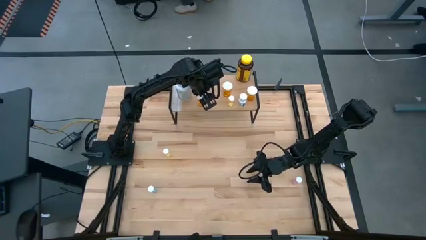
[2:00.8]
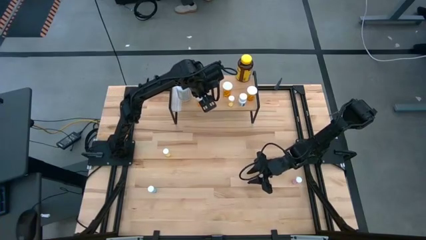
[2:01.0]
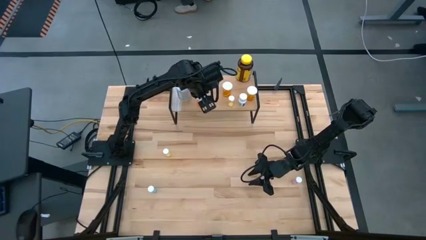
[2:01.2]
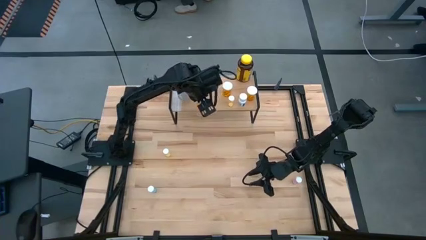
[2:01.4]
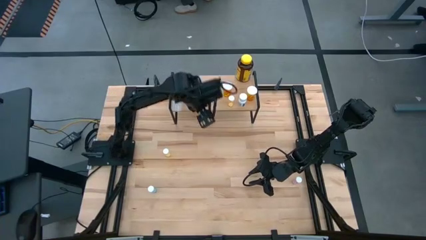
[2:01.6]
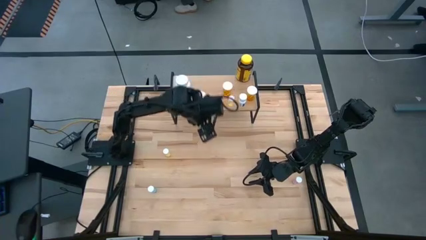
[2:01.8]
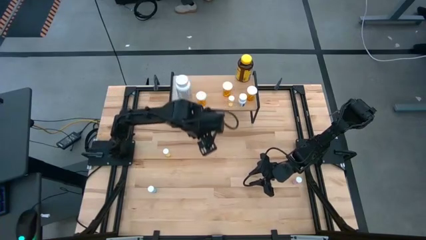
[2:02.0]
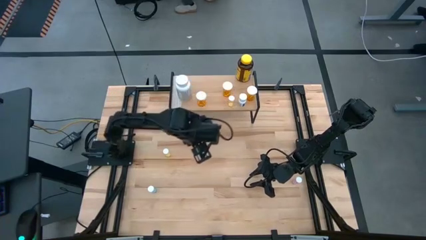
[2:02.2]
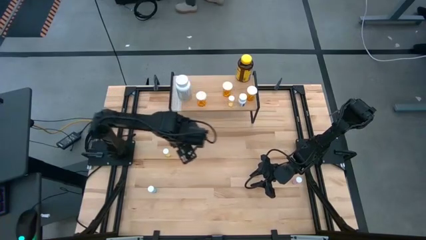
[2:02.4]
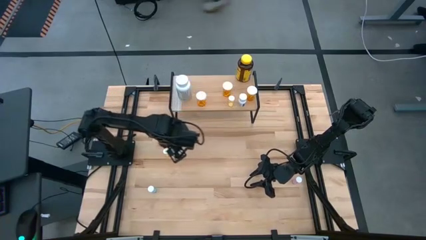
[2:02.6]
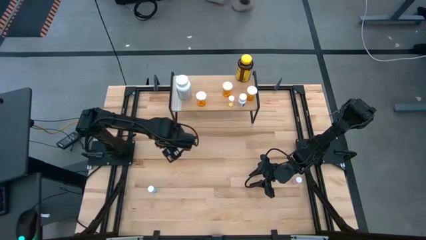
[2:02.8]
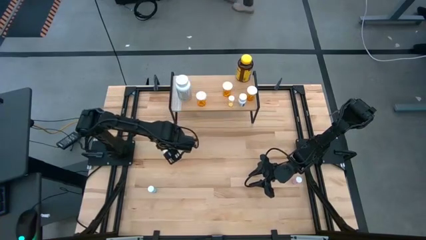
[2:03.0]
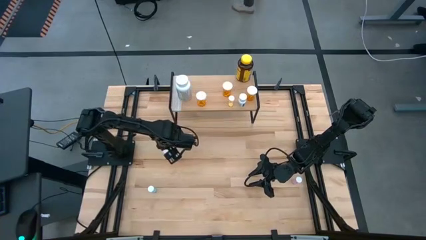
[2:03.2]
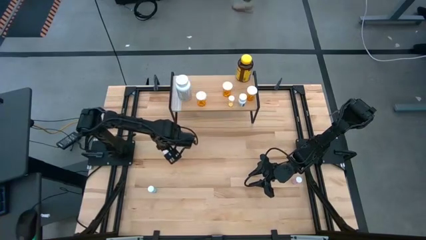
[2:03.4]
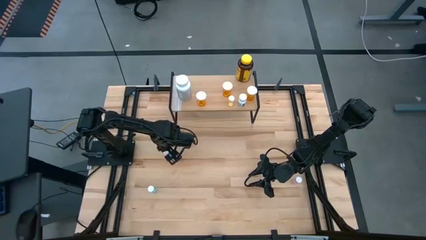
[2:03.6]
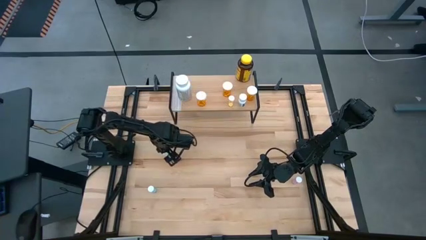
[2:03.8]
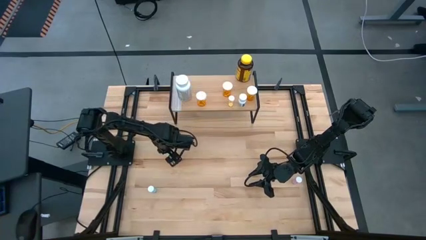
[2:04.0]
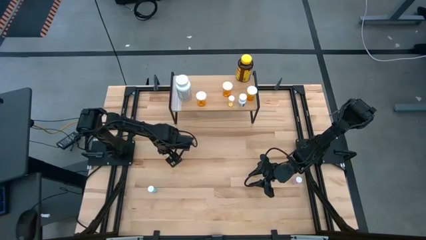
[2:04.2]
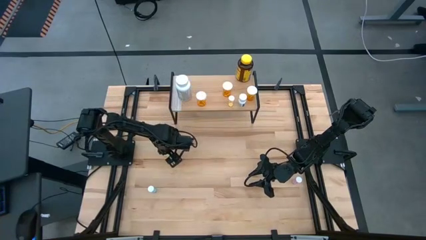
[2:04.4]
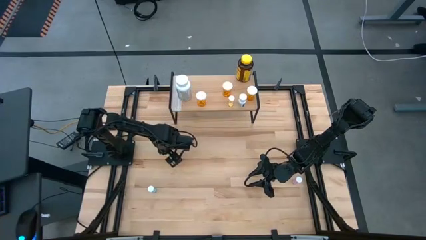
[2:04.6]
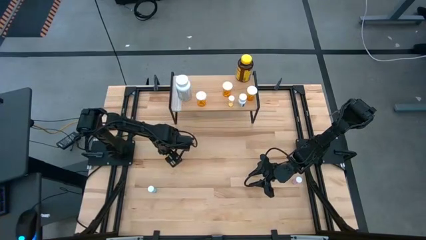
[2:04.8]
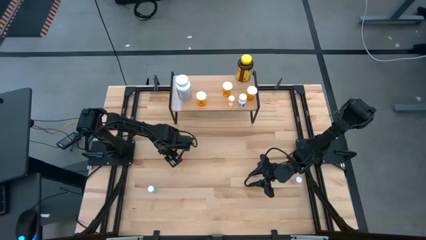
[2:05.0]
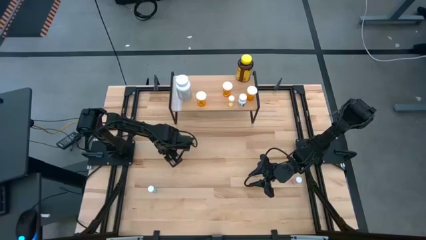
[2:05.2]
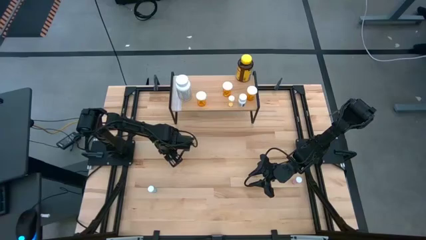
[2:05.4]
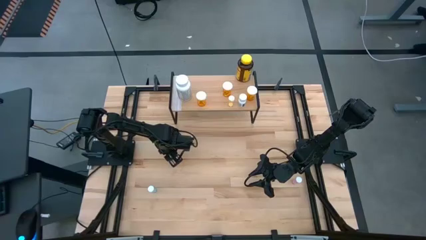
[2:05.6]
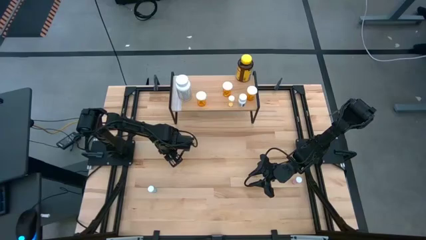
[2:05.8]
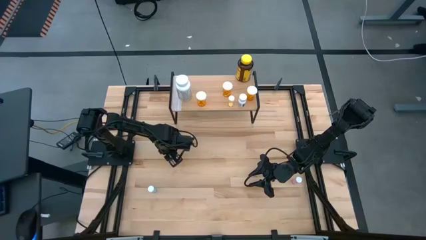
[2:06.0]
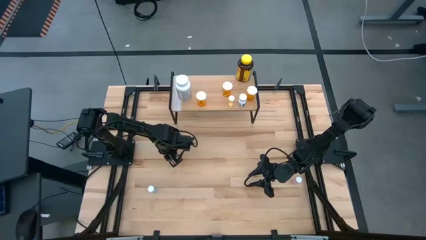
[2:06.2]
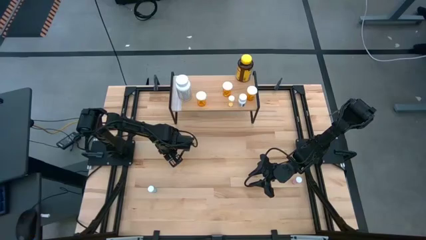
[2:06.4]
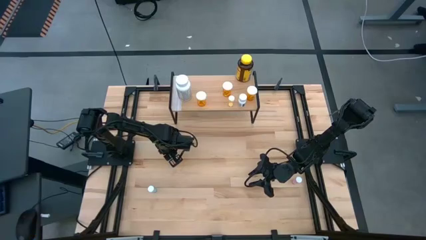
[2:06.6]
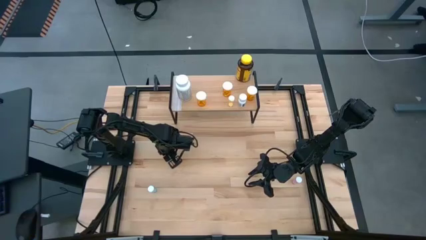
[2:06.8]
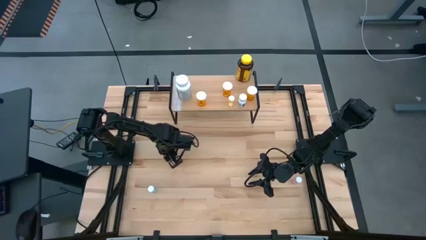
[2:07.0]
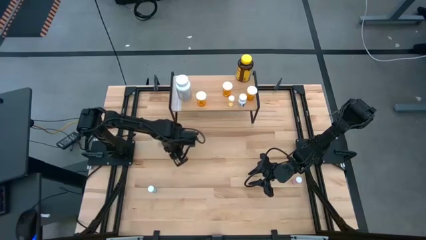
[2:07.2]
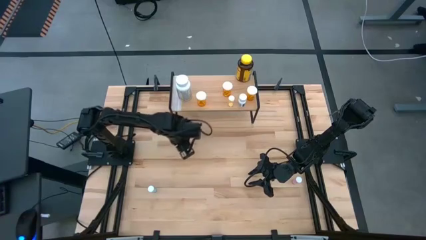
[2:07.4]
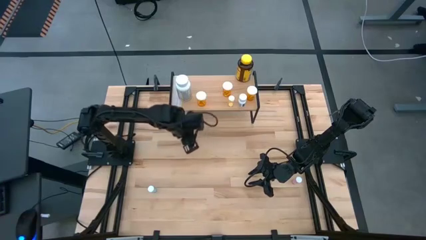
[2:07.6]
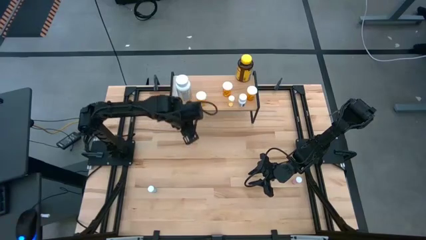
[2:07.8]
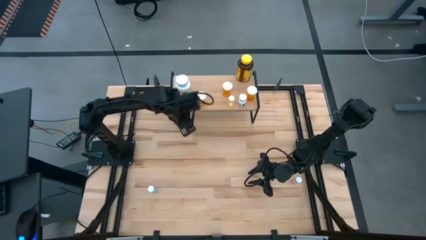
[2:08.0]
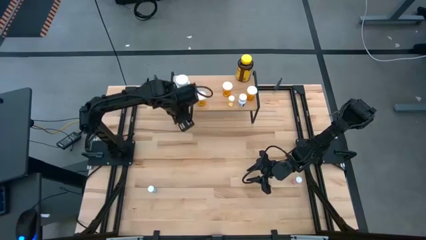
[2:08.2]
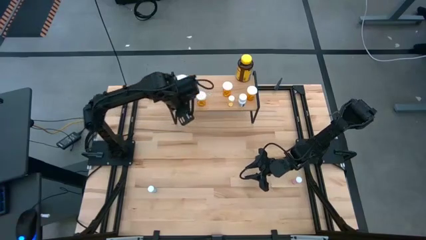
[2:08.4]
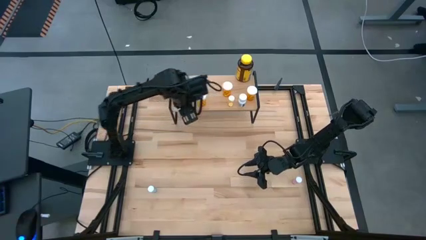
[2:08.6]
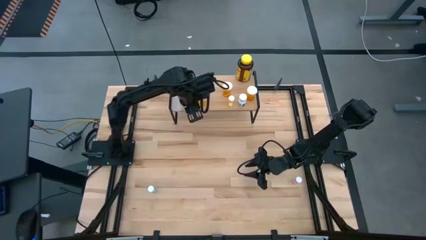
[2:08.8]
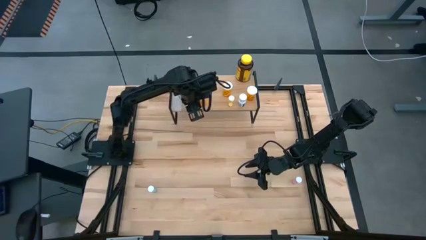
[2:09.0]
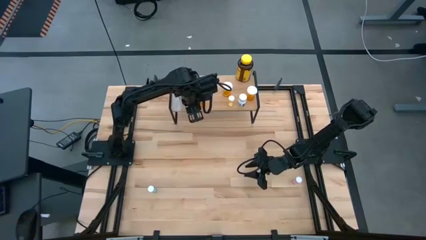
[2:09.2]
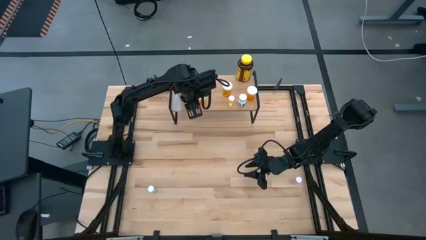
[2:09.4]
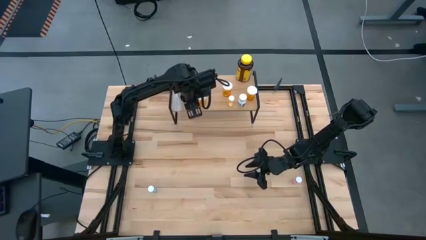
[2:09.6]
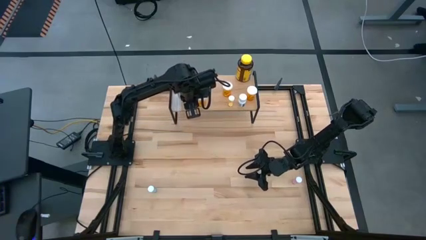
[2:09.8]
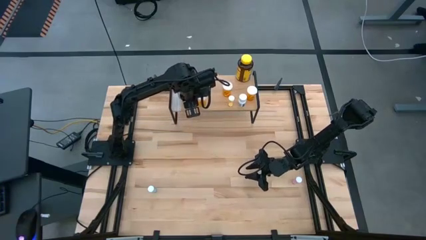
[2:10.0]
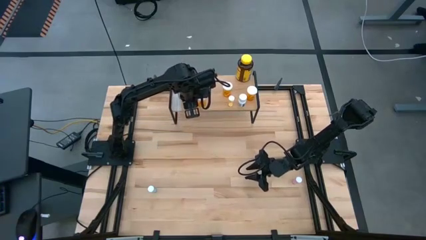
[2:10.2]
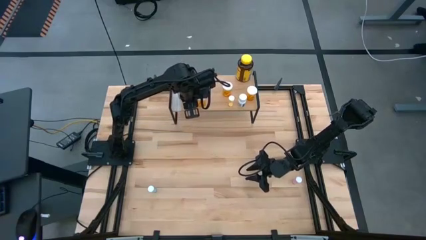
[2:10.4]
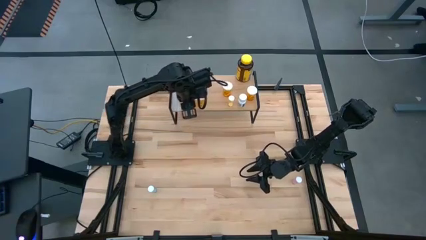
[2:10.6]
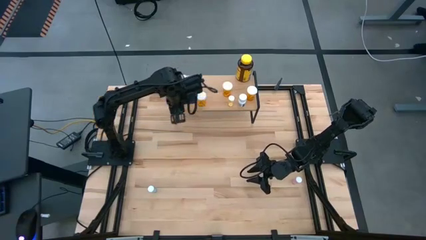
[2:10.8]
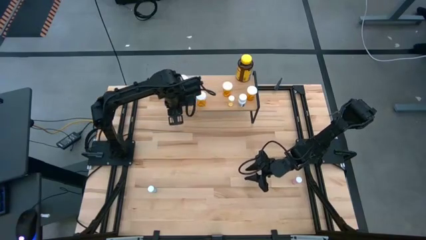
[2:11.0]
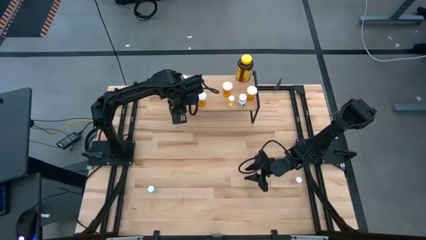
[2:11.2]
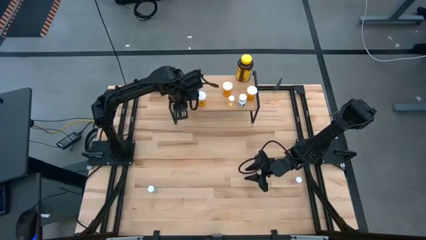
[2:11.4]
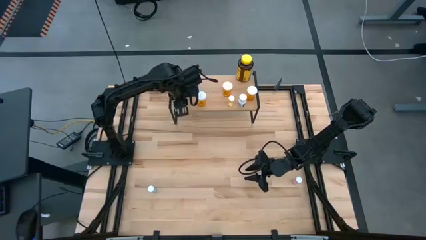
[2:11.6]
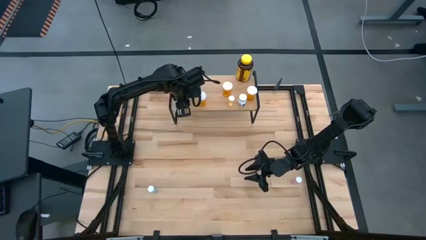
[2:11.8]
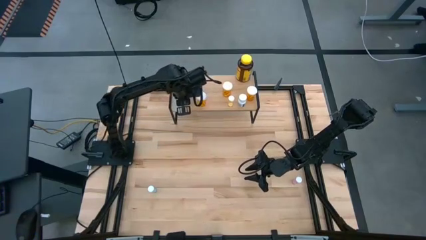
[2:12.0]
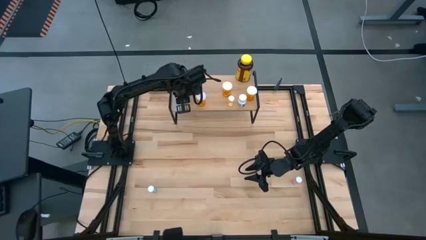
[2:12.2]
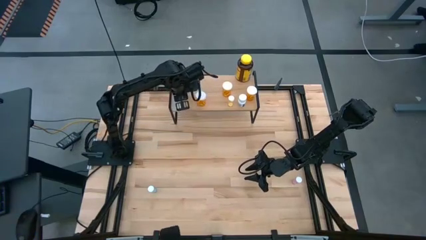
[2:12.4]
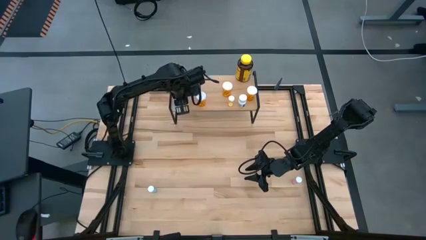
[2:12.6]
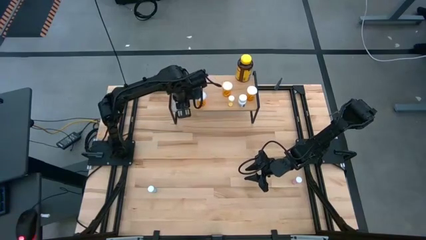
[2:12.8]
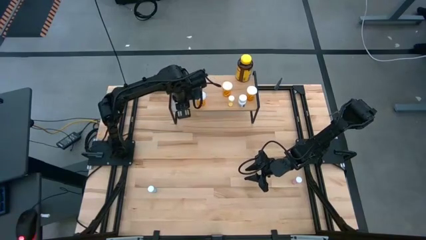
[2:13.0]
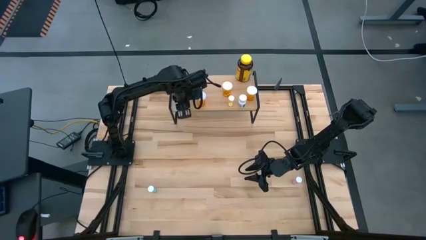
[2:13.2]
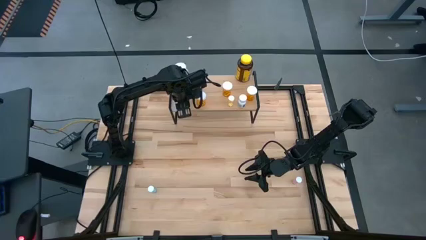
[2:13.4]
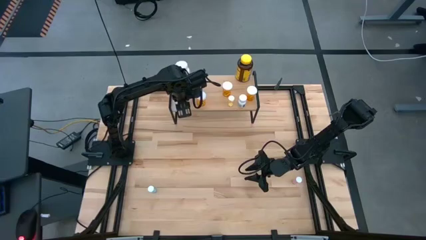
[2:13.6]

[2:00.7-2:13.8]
Task: Pick and place medicine bottles onto shelf by color
Put the small yellow medicine bottle on the shelf

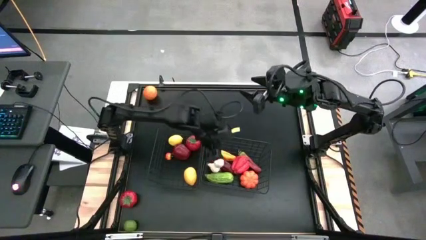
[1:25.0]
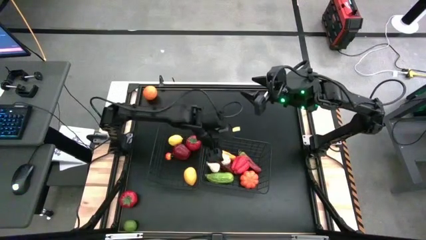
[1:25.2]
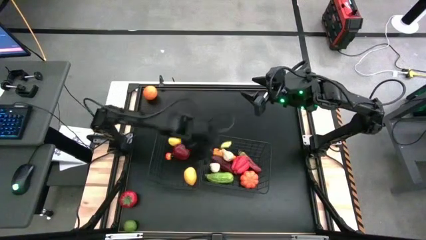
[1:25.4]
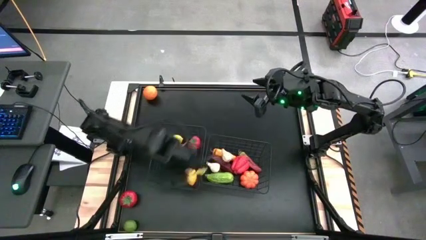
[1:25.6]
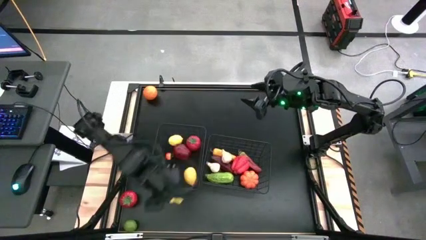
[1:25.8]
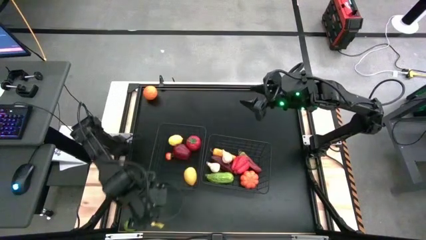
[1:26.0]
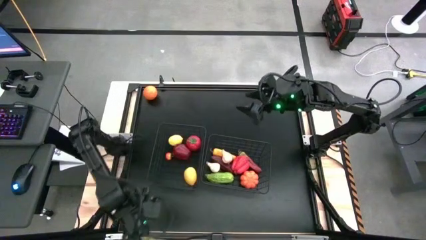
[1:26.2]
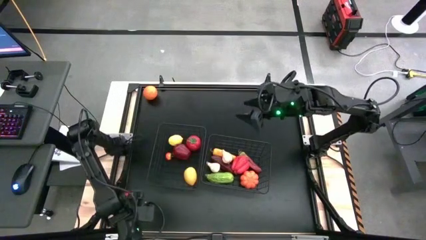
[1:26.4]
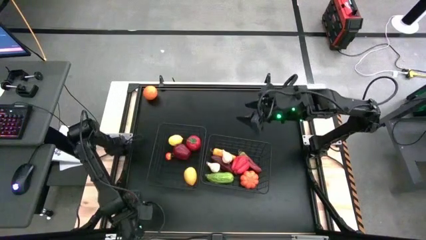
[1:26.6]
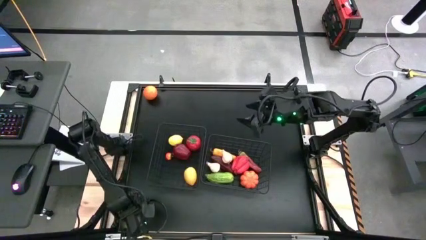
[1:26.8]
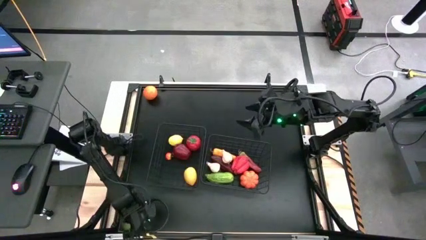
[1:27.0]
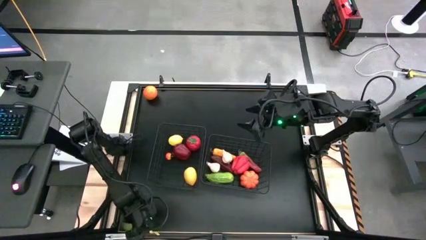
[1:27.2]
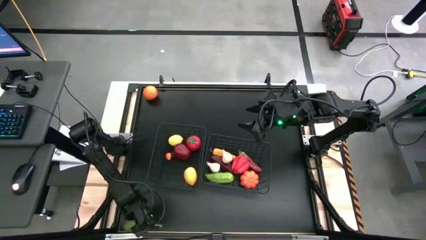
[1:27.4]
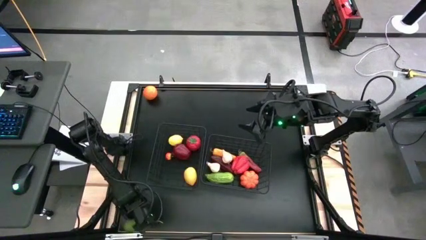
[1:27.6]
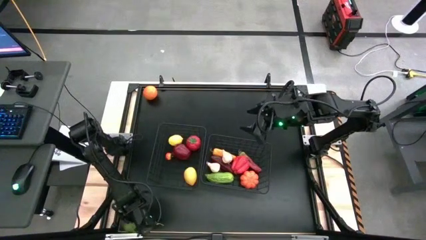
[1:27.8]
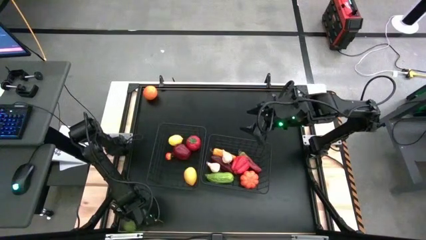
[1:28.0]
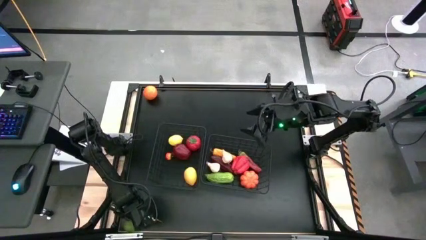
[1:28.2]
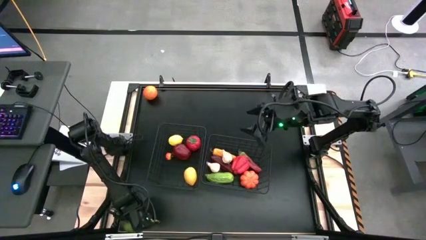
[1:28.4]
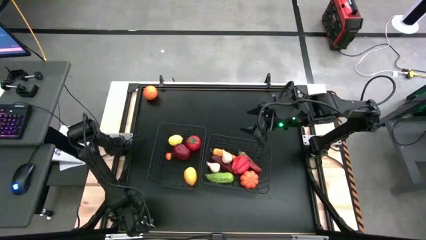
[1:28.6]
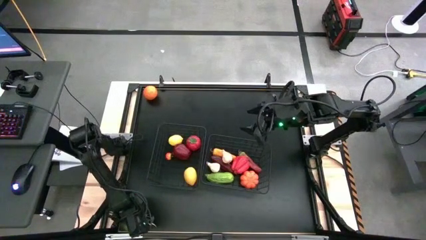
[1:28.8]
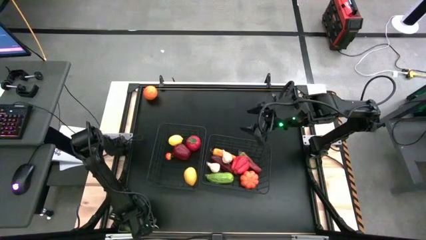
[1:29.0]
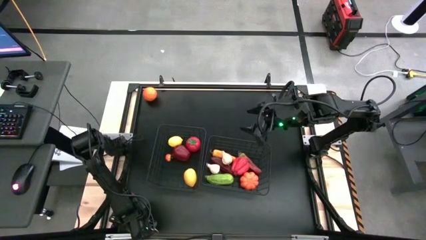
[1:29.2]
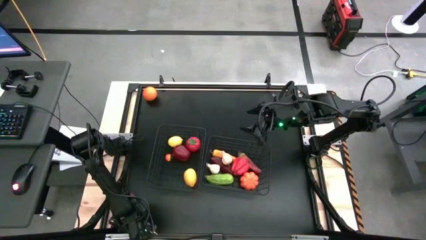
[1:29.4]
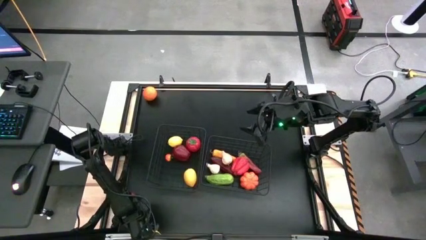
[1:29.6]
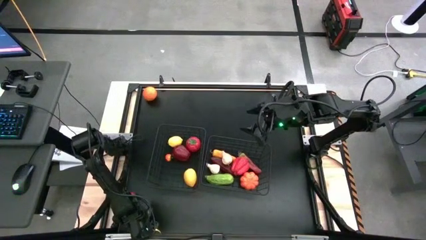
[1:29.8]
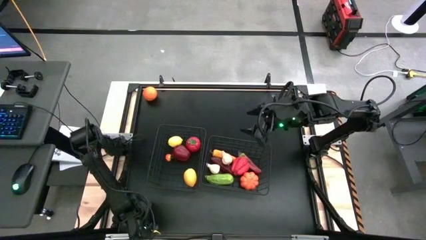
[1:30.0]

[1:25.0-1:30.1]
Task: Sort produce into baskets
Put the green lime into the left wire basket
